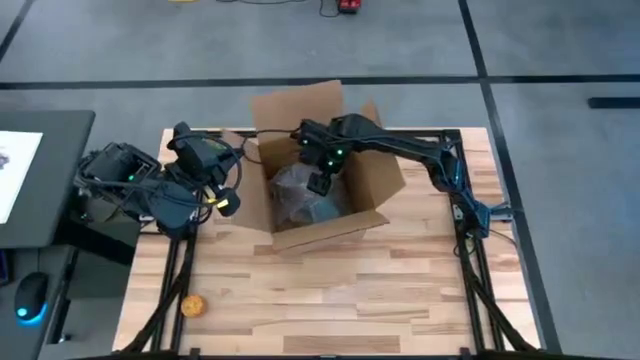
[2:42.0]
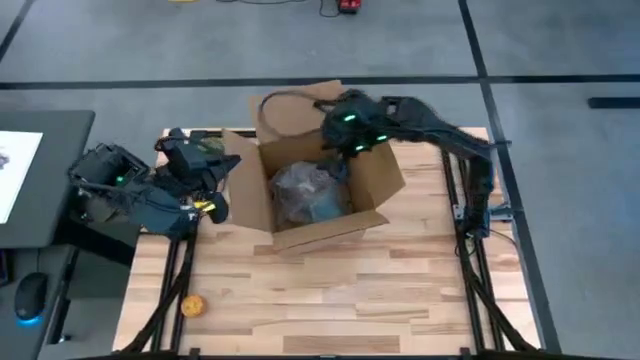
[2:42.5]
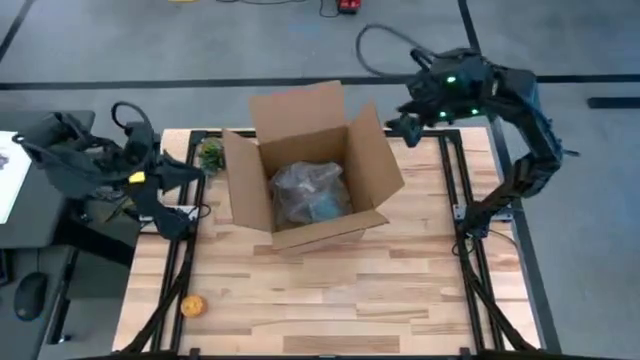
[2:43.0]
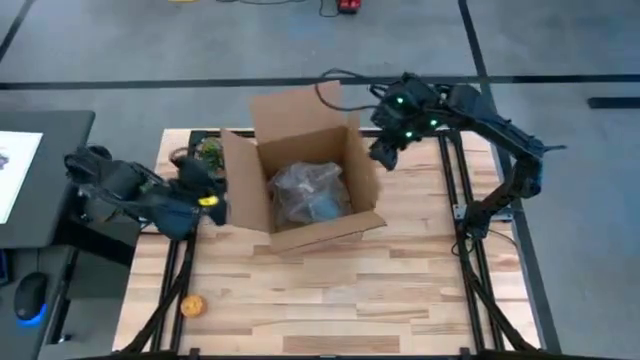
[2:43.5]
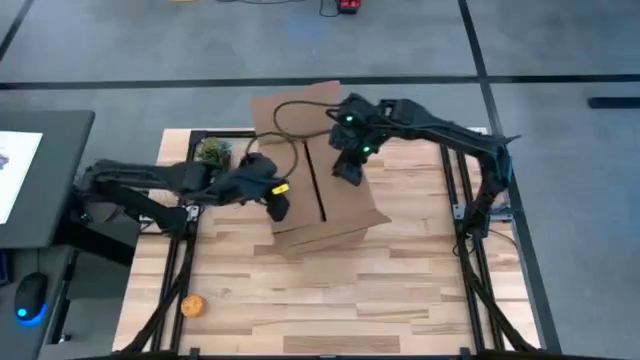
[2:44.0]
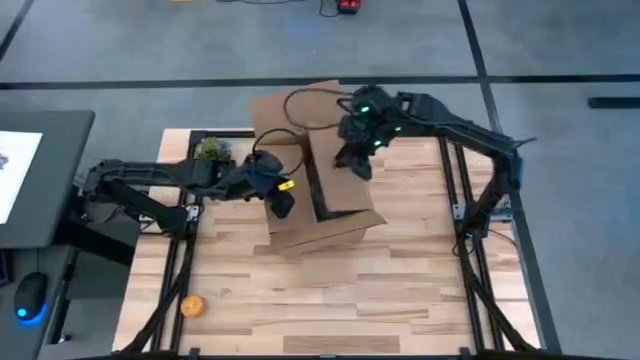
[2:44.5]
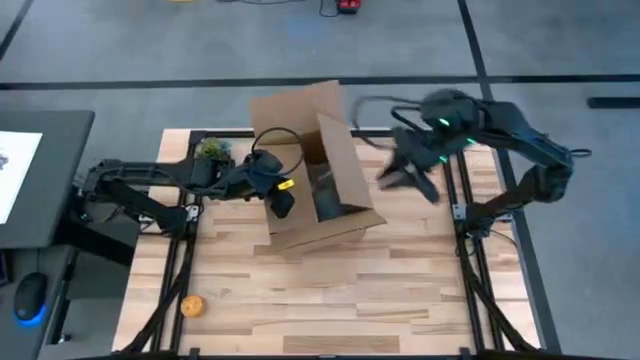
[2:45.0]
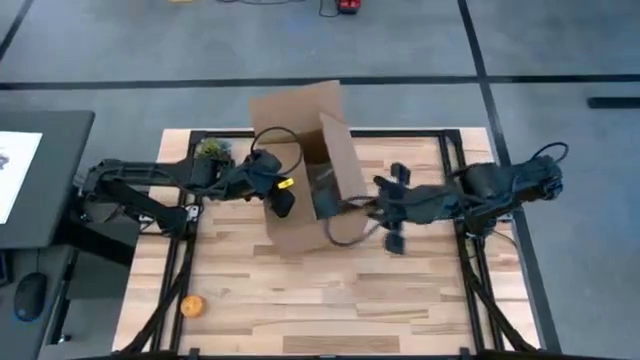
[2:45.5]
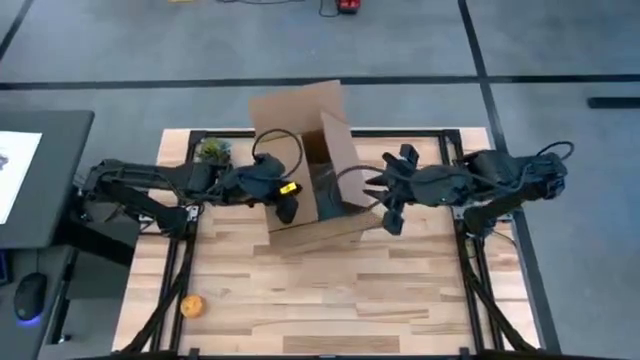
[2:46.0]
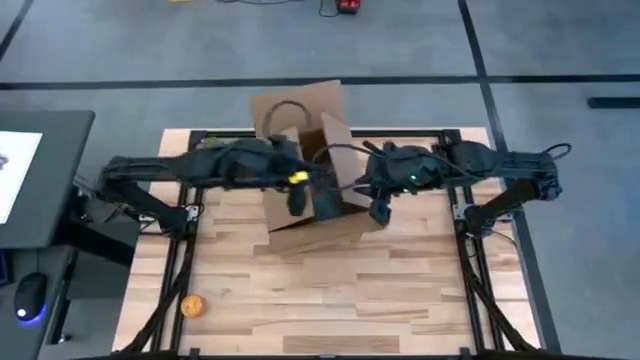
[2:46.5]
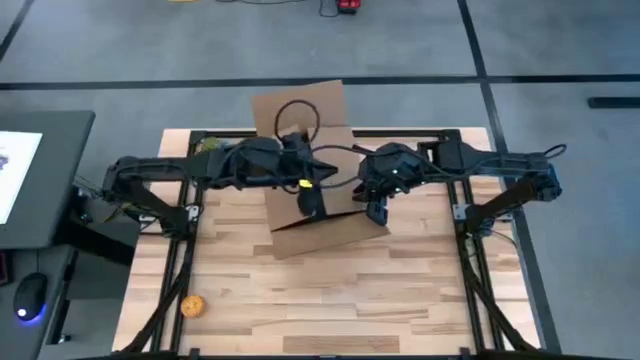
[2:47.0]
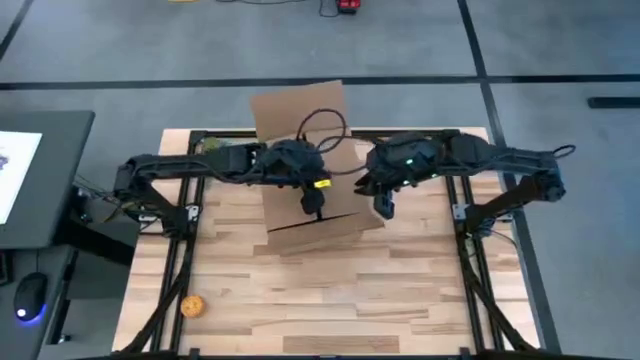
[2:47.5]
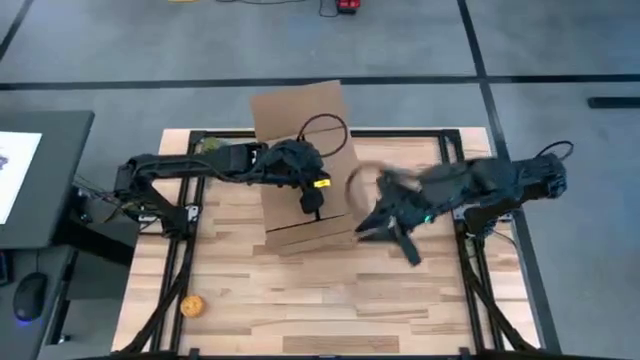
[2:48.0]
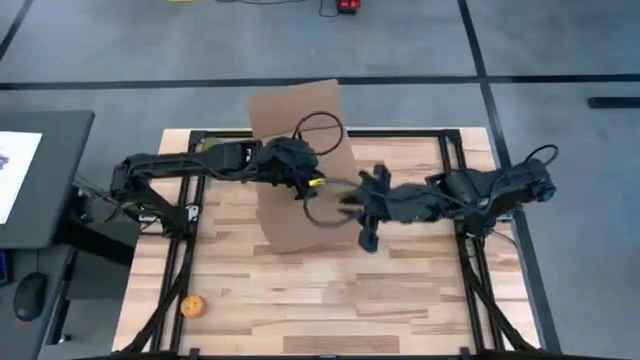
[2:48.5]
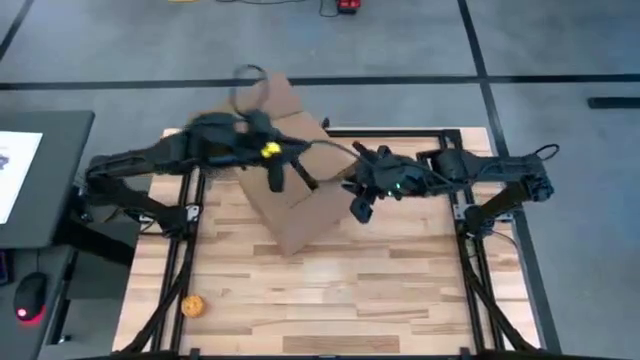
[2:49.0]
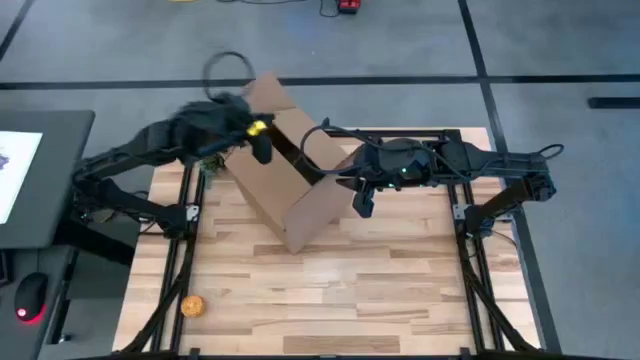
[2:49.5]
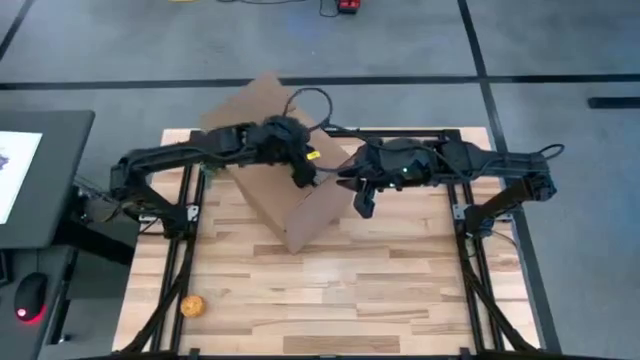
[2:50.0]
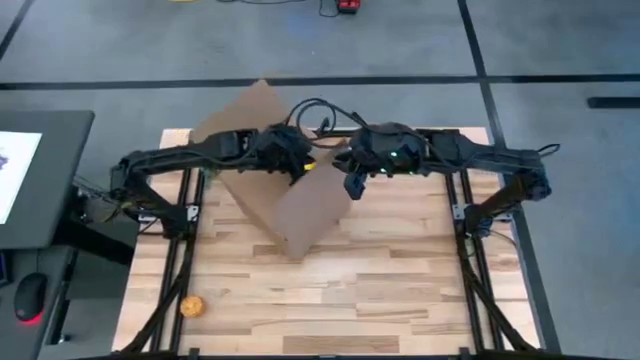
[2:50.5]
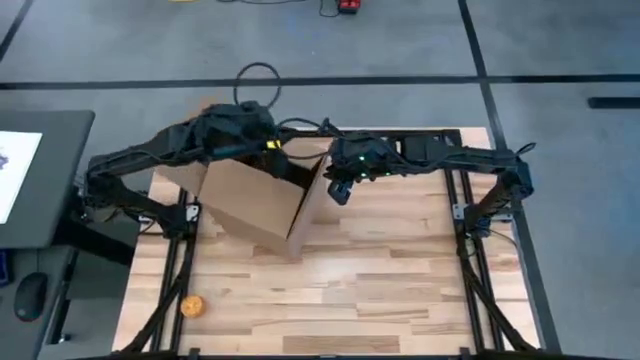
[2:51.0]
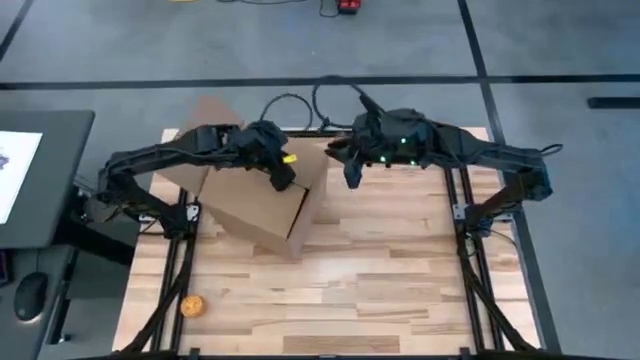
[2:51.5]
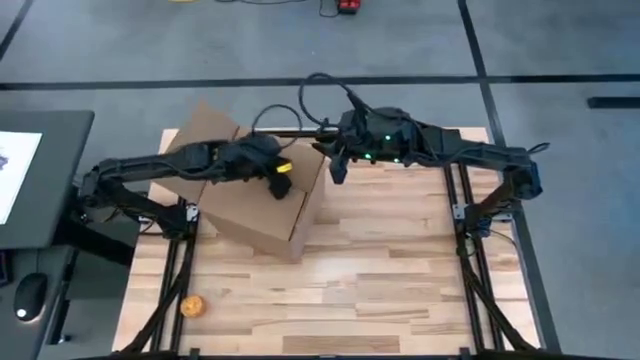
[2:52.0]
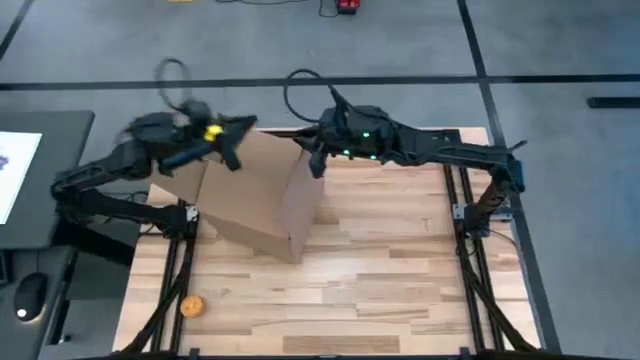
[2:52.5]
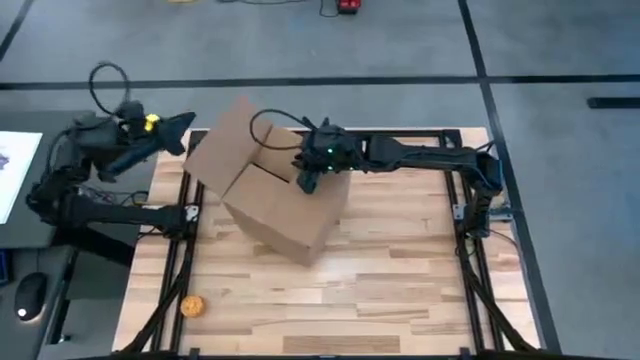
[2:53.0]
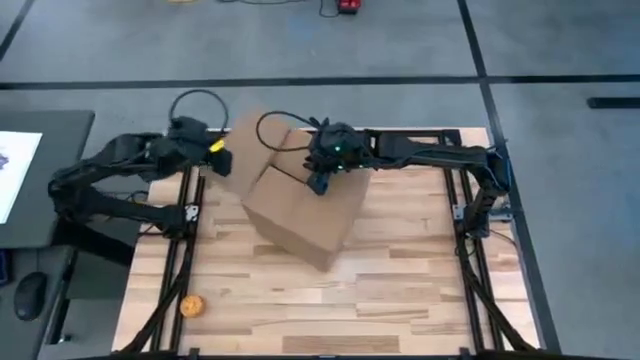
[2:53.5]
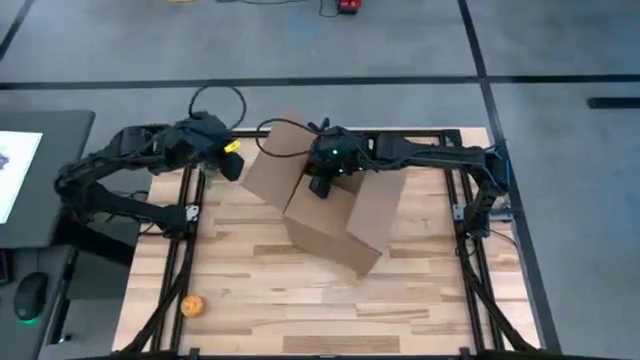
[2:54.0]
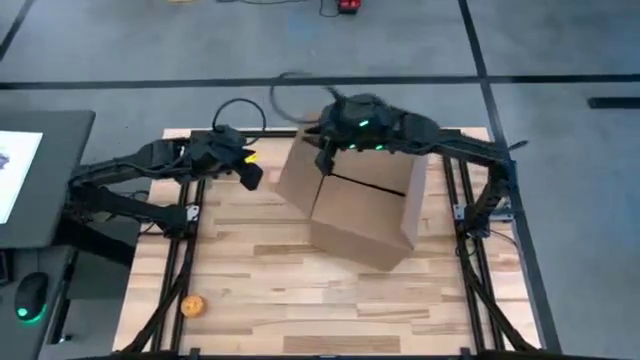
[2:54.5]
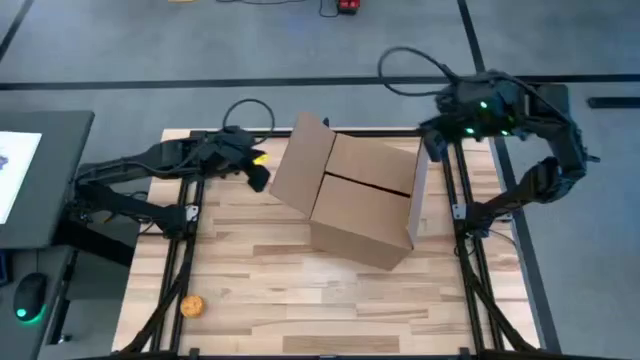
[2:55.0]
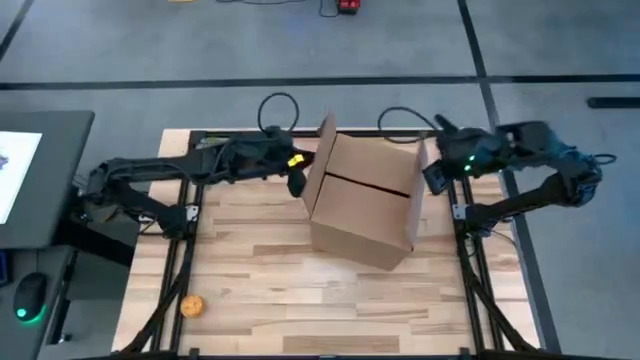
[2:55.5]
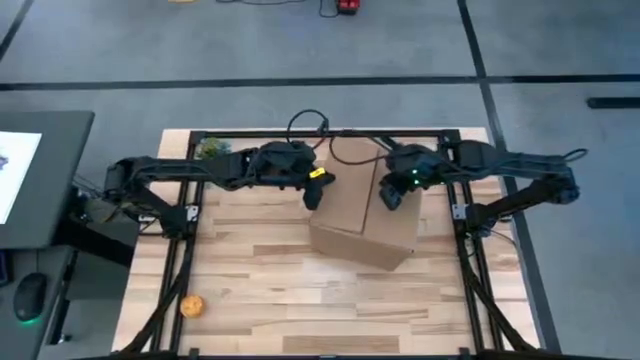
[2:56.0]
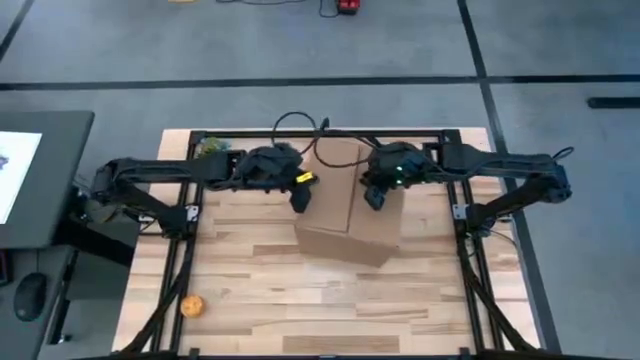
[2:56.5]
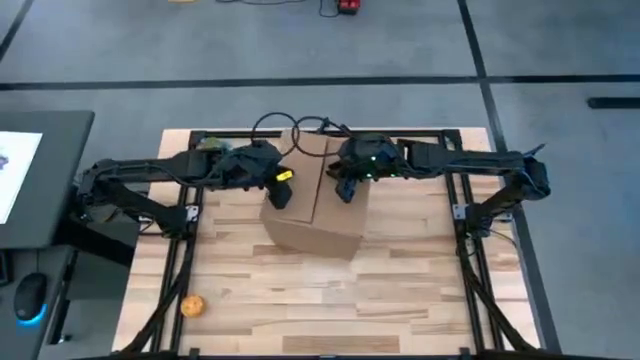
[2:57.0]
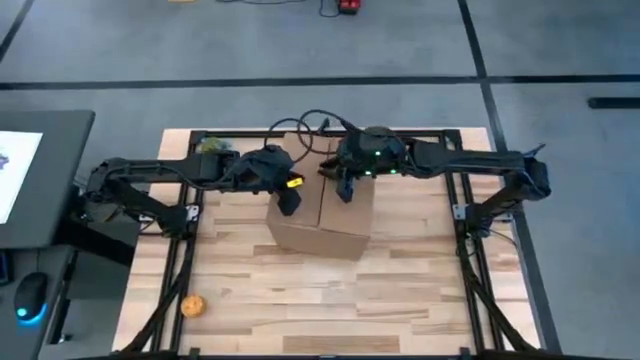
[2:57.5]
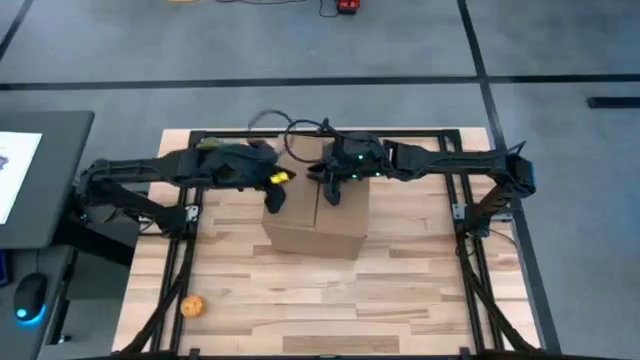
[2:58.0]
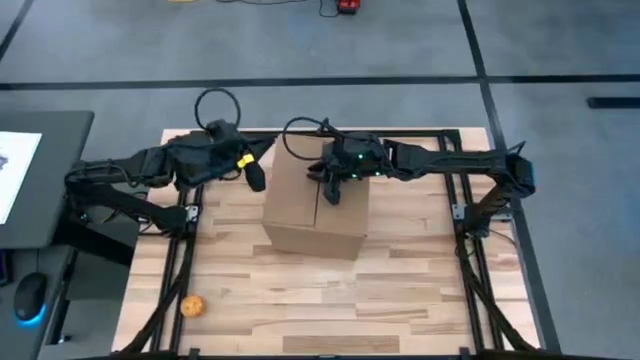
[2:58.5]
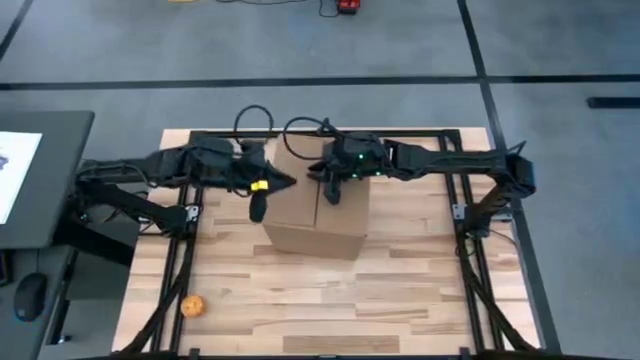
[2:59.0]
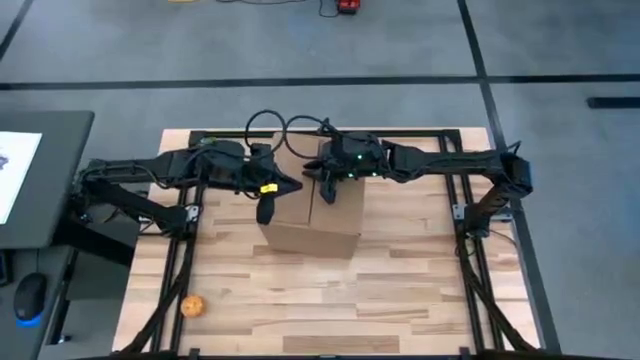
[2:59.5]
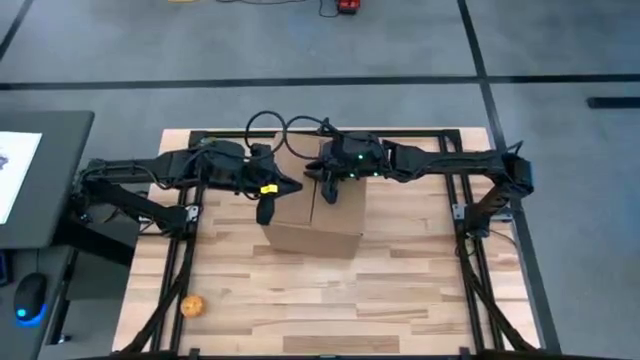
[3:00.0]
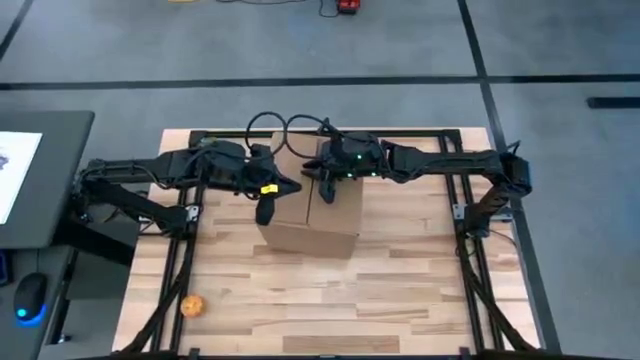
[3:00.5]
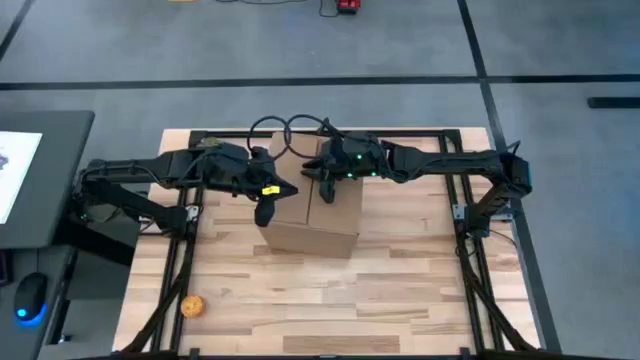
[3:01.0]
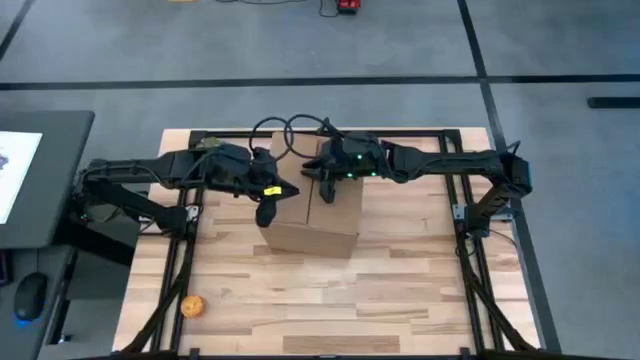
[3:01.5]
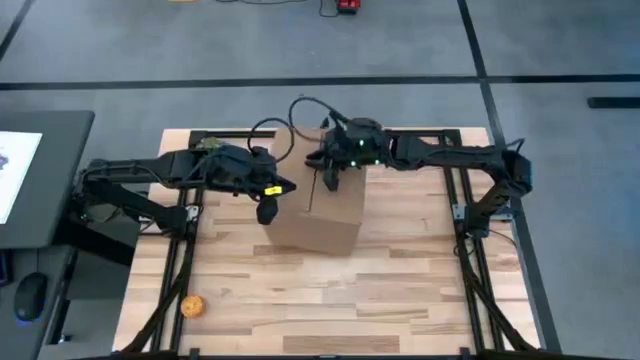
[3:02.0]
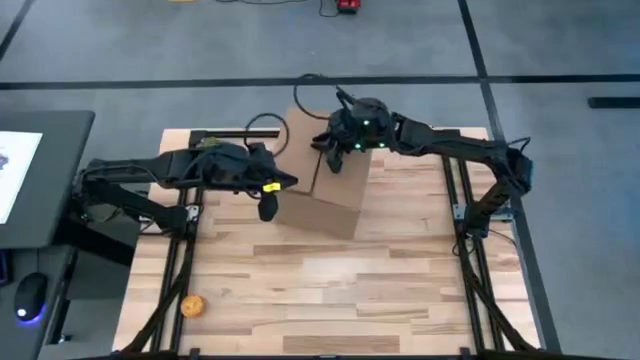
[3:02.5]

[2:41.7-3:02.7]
Task: wrap mug
Close the box
